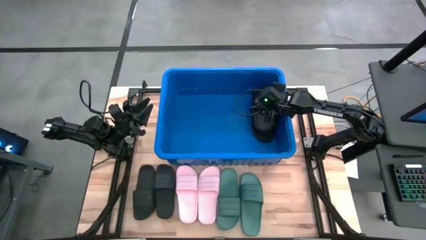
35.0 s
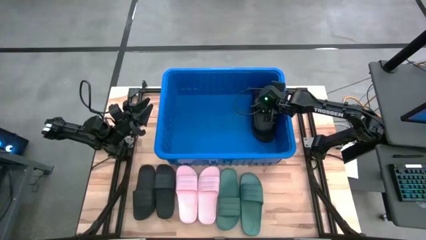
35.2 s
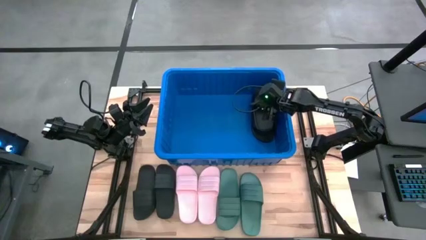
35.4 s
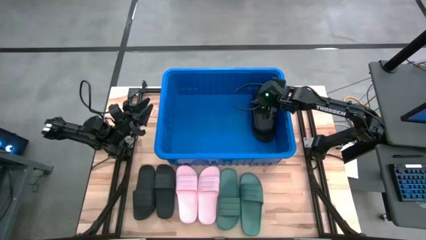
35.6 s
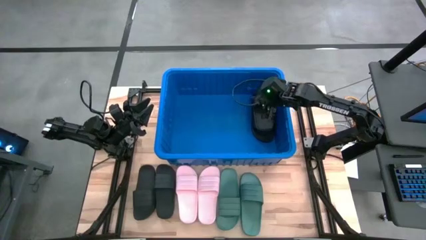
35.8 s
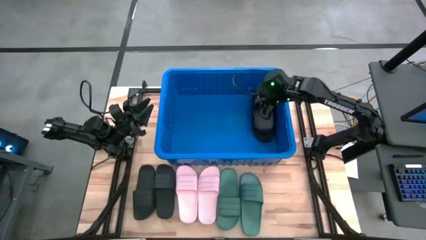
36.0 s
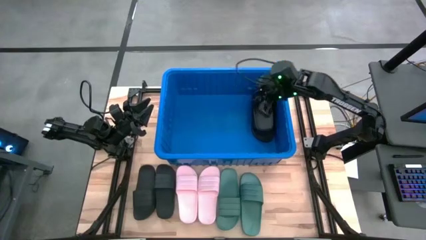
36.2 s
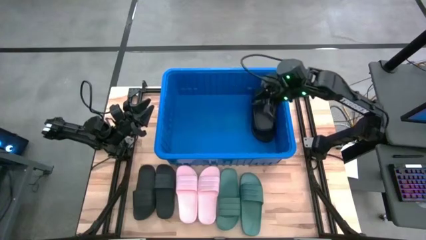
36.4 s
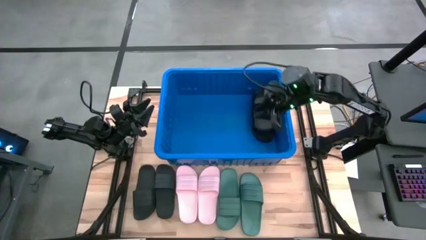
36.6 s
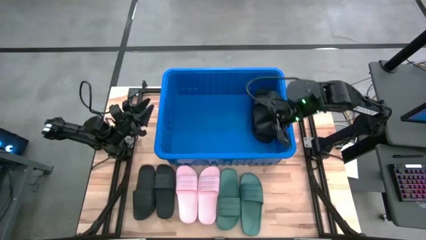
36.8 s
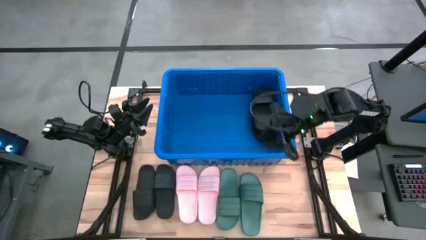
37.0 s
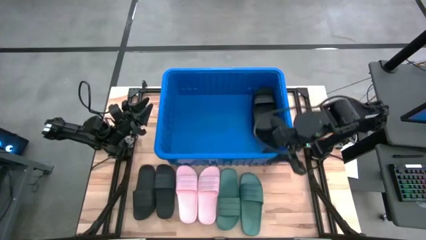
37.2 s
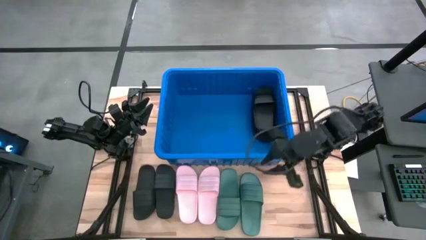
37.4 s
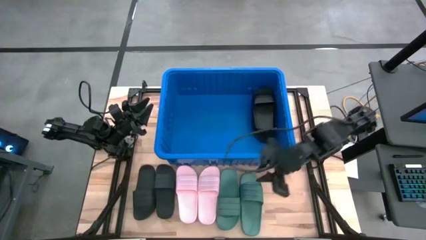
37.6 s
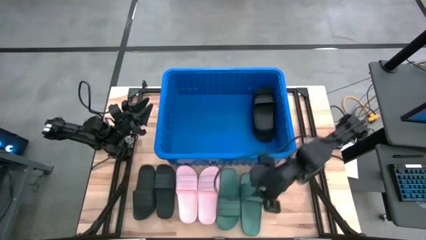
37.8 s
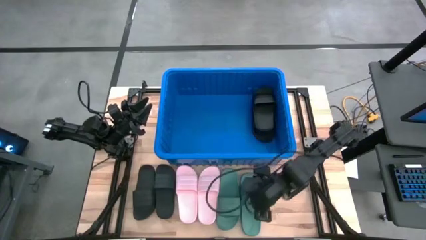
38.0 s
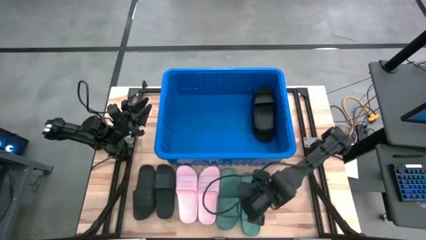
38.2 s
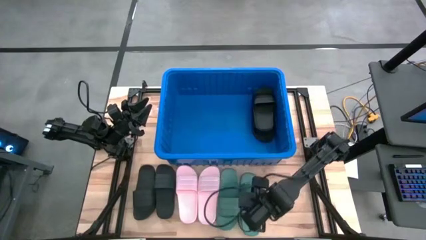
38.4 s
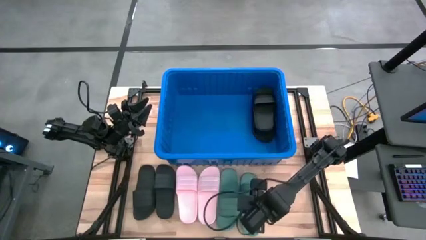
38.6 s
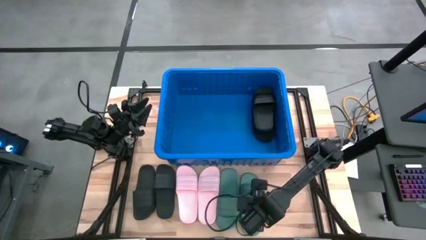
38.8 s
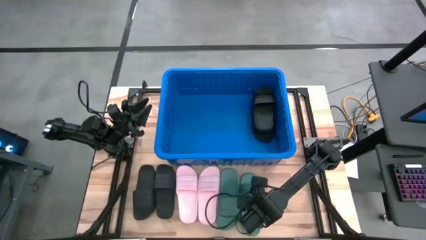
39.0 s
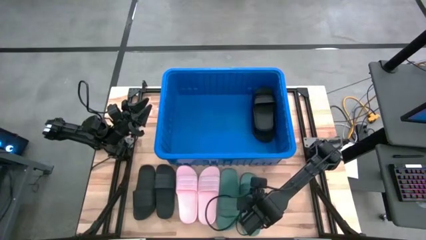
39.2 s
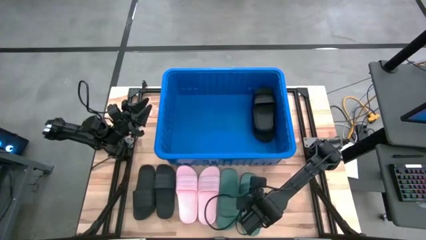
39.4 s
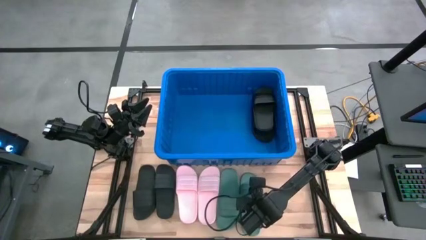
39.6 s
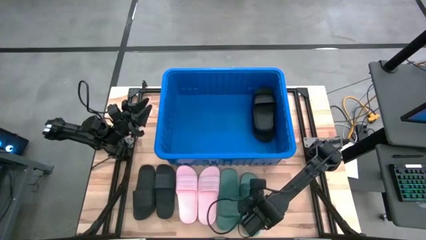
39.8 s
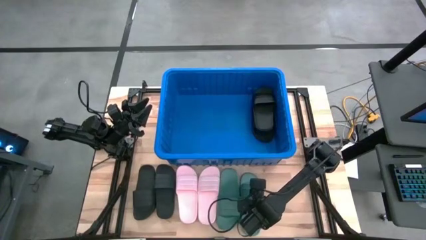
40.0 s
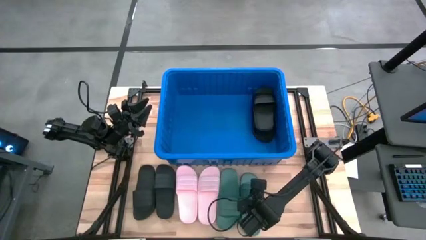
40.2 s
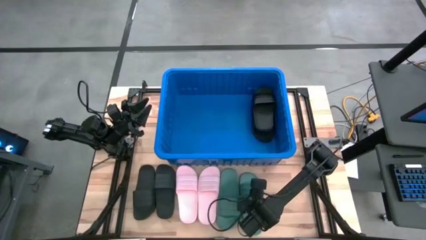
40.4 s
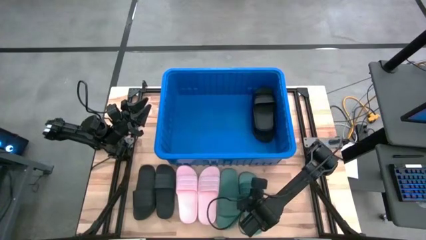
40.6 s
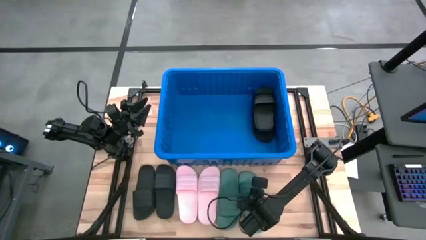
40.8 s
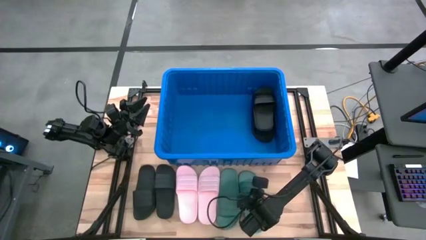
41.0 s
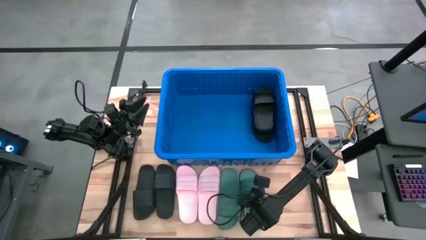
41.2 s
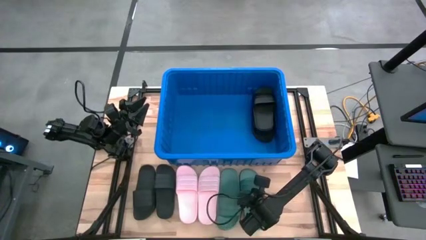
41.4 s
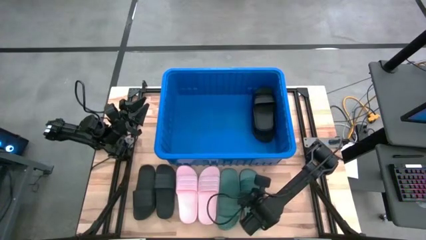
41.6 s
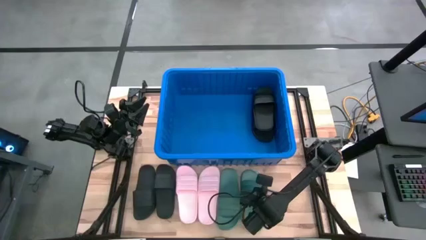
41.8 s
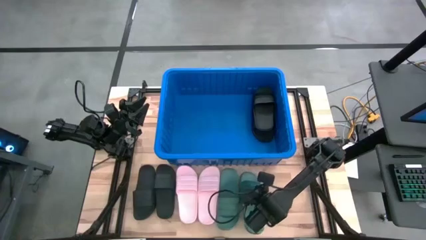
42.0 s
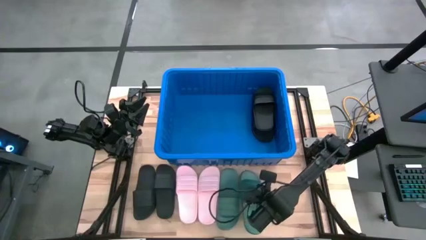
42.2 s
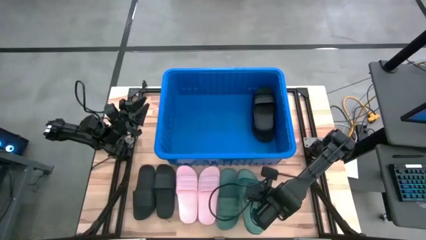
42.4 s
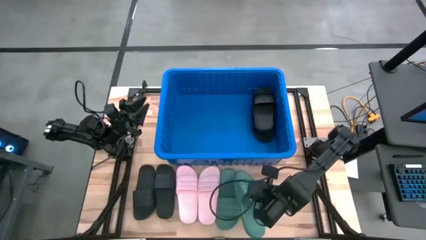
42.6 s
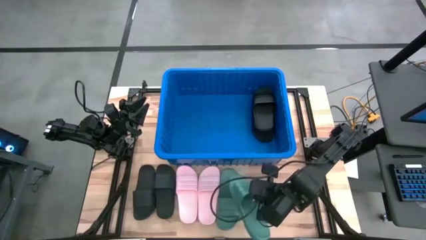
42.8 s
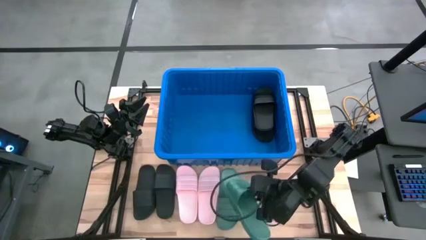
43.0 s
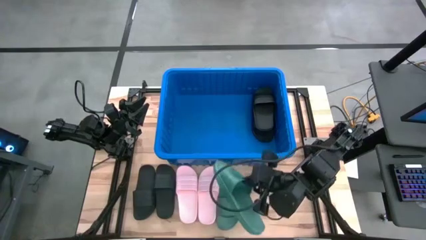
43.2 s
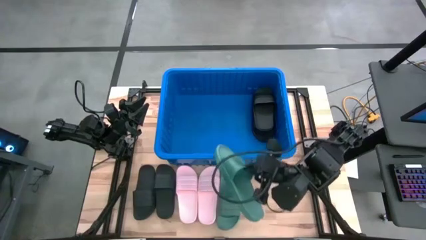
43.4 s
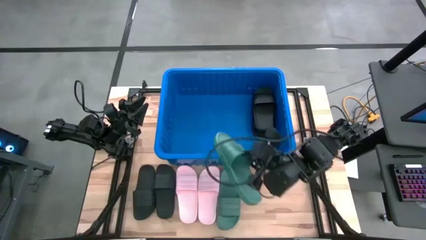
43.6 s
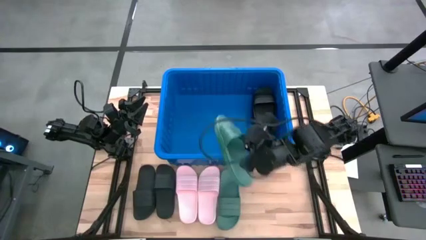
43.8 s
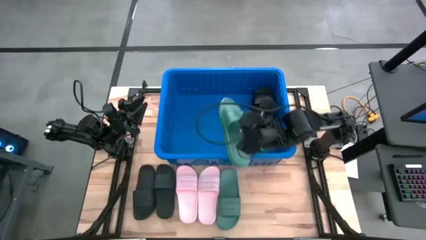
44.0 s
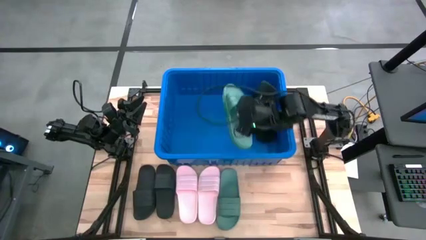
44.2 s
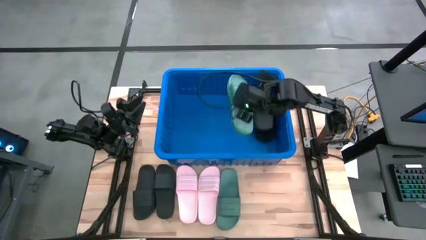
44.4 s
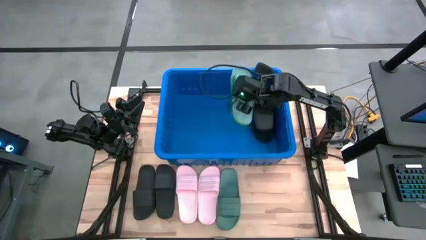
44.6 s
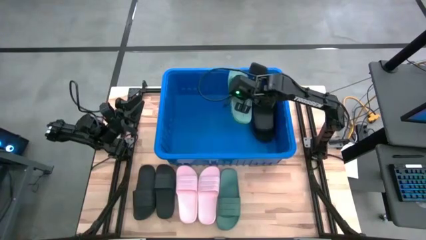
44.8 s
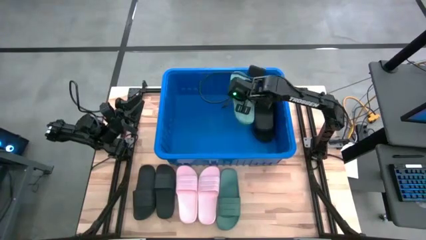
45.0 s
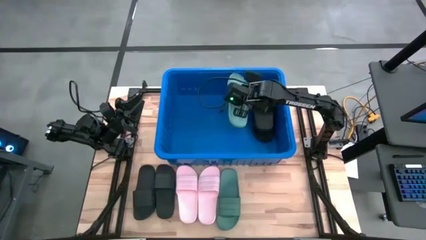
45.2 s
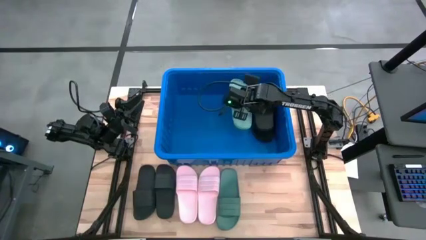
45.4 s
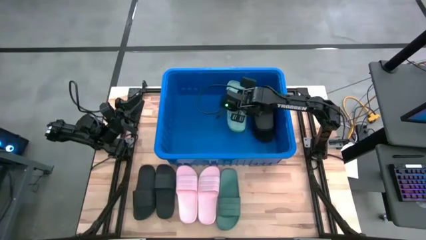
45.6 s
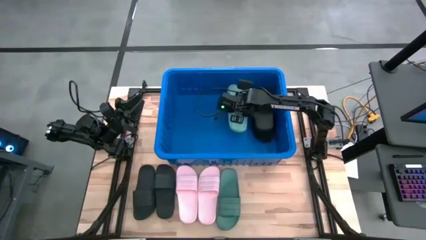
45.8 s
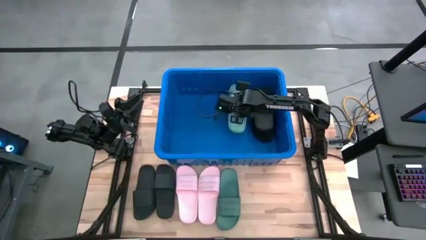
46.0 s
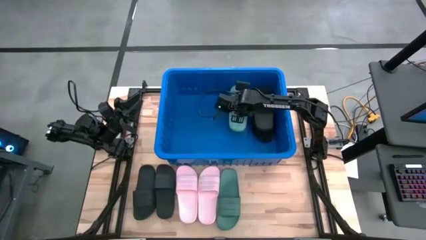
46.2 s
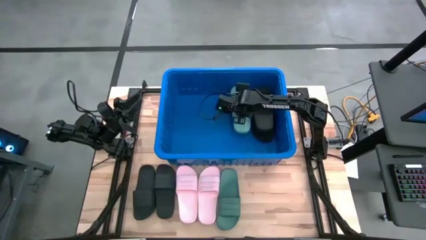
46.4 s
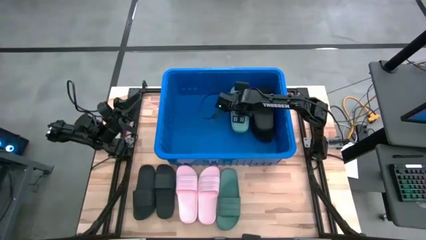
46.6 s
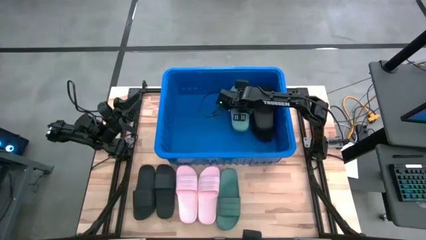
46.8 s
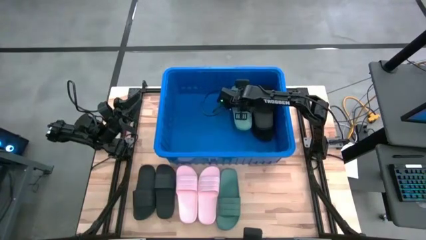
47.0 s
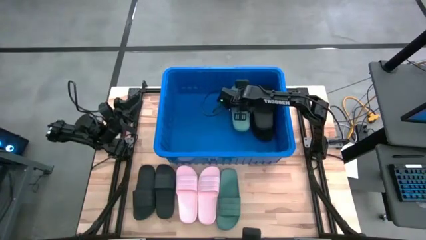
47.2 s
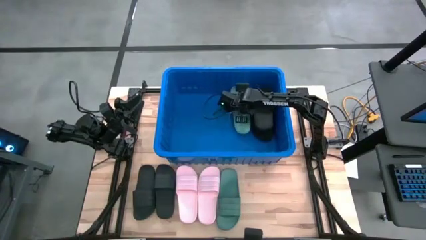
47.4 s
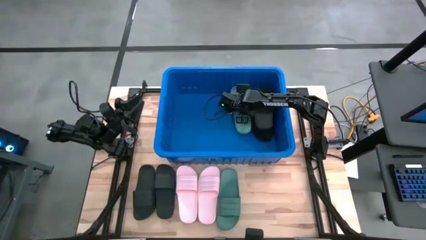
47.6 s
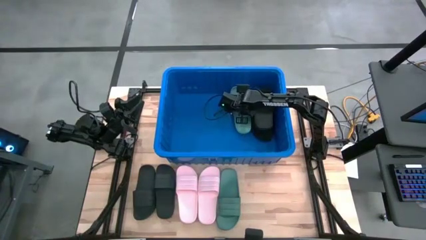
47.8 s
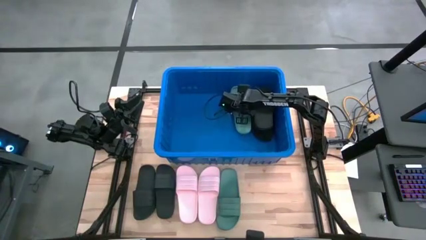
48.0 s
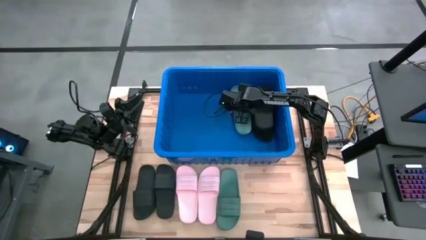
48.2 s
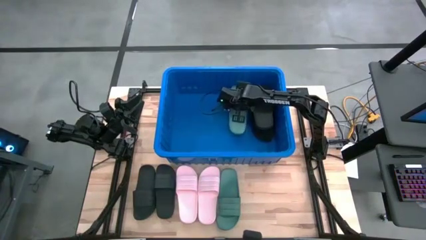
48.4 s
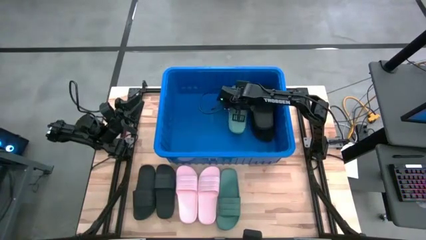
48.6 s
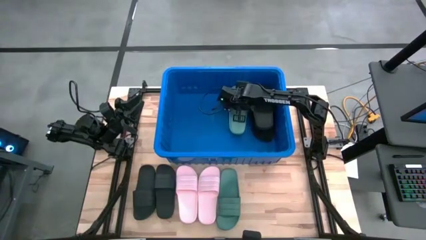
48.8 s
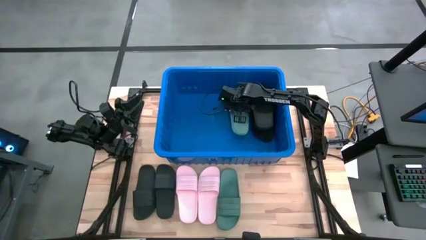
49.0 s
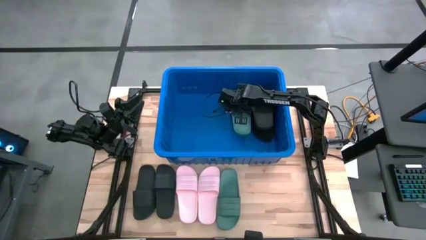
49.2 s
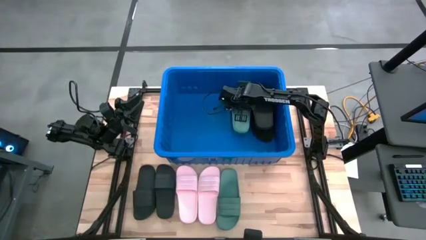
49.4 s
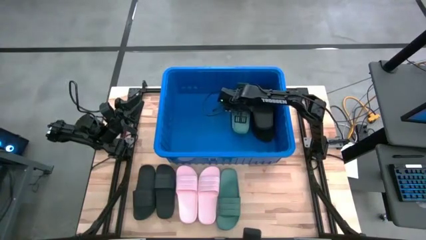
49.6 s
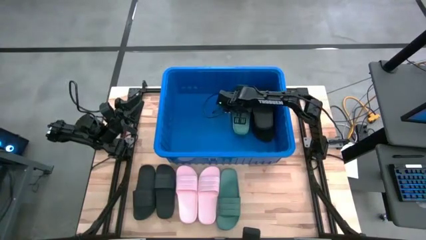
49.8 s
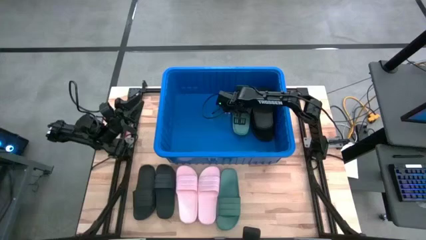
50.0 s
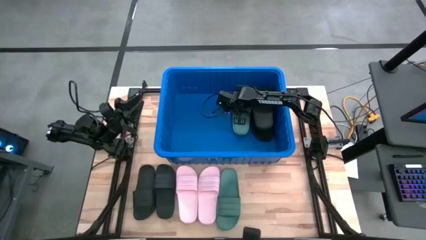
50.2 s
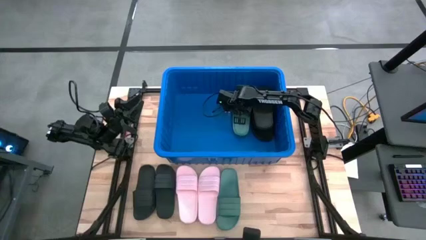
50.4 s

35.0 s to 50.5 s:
Task: Pick and place slides into bin
Put the green slide into the bin
